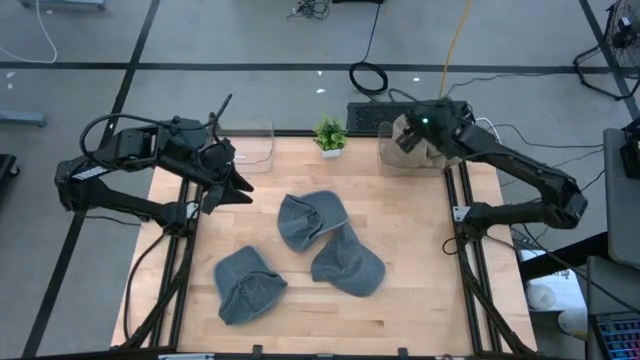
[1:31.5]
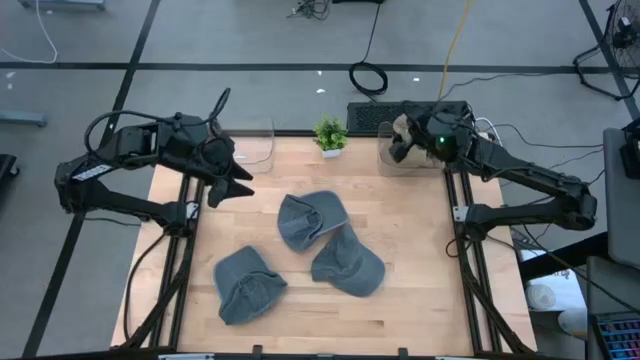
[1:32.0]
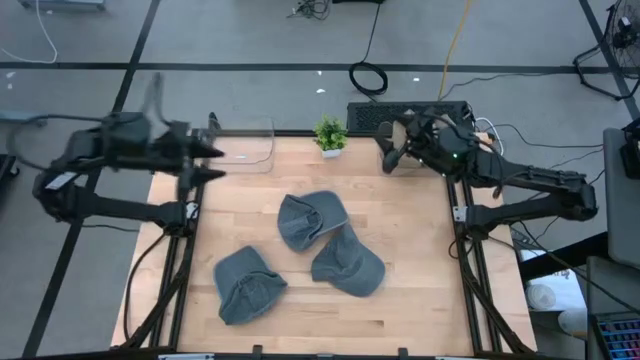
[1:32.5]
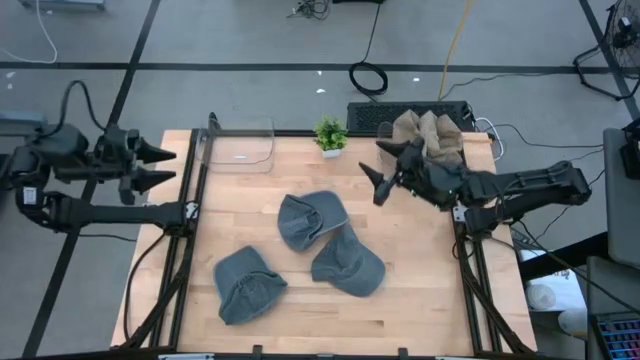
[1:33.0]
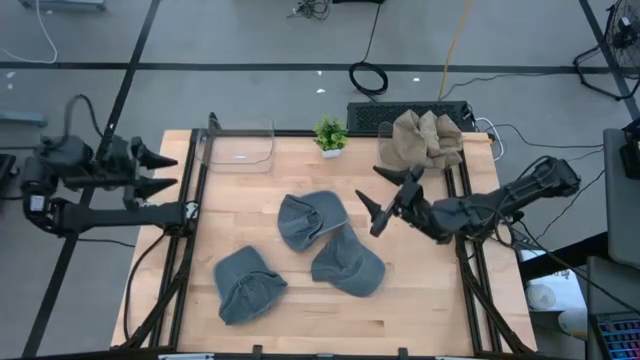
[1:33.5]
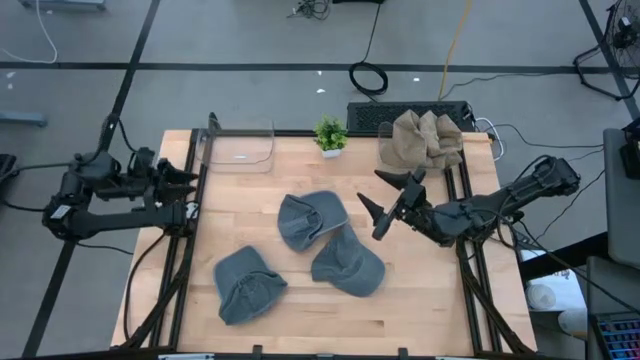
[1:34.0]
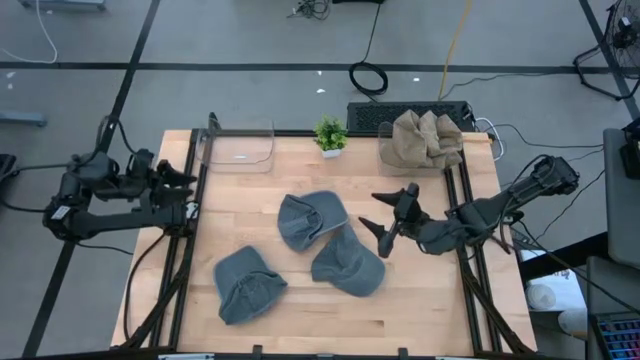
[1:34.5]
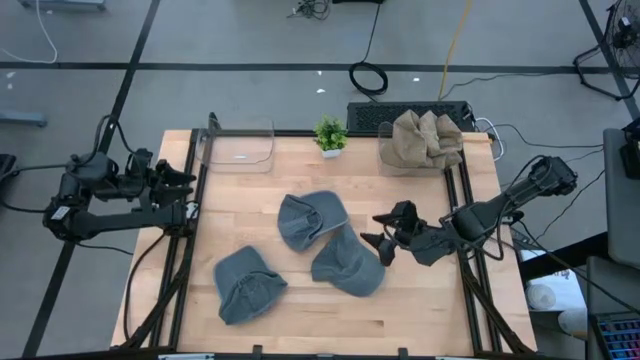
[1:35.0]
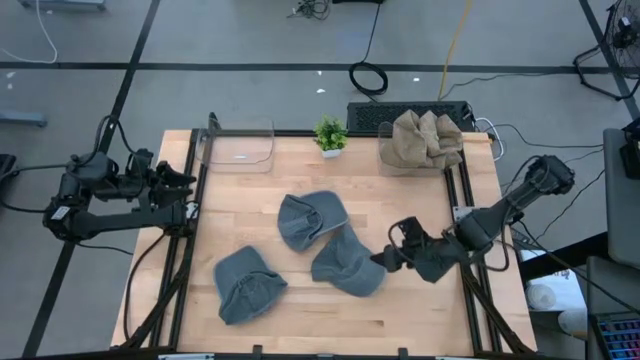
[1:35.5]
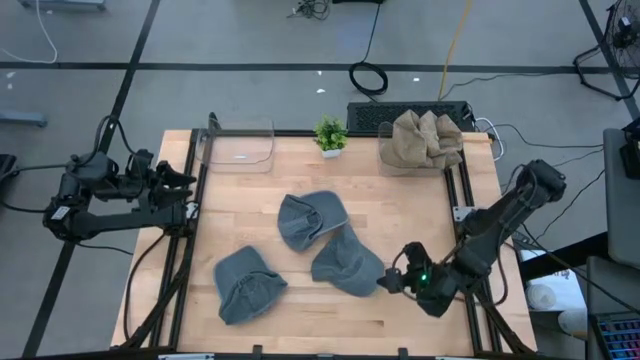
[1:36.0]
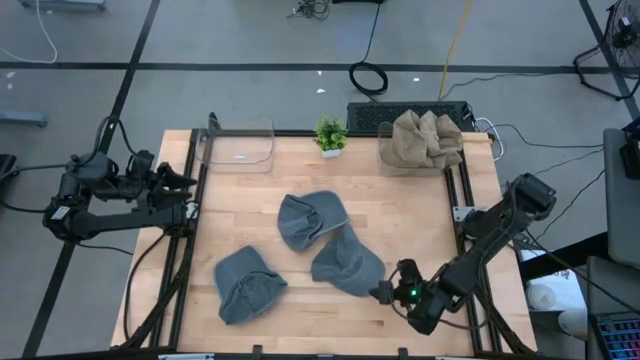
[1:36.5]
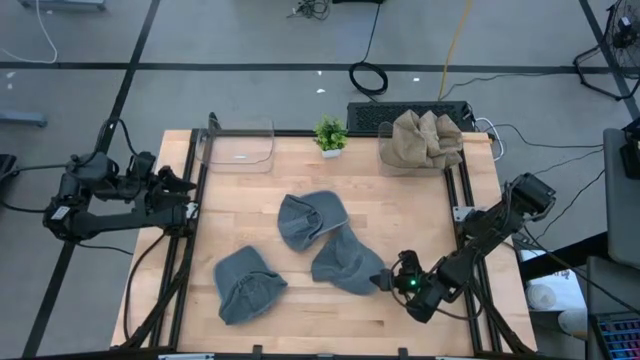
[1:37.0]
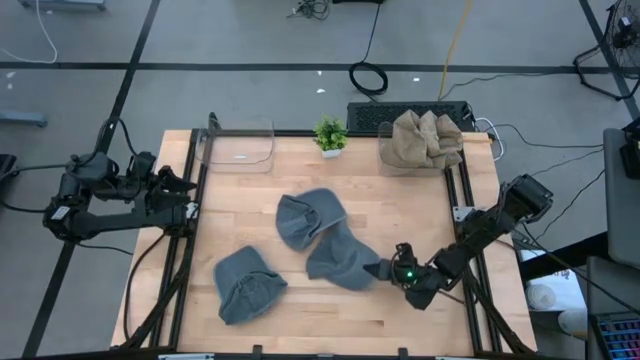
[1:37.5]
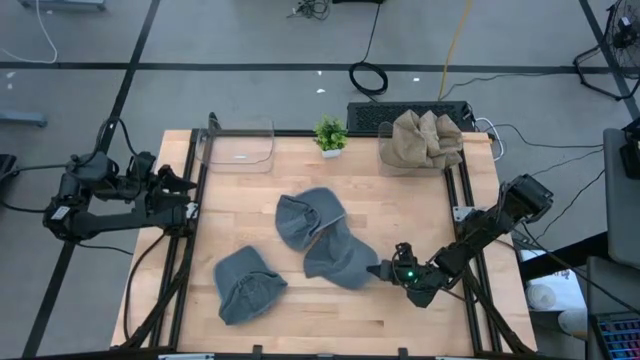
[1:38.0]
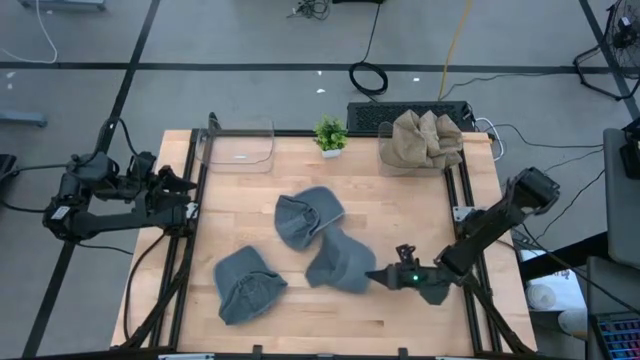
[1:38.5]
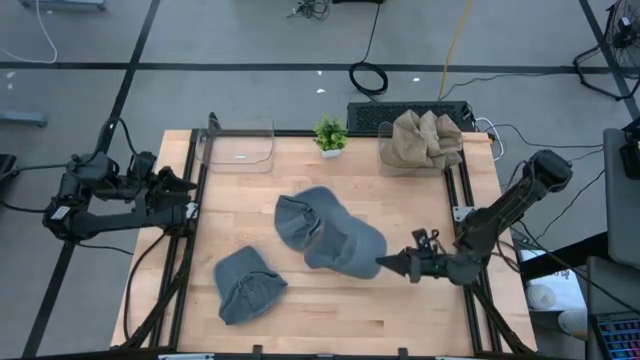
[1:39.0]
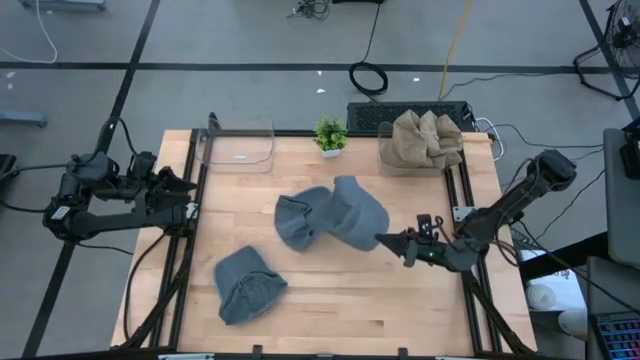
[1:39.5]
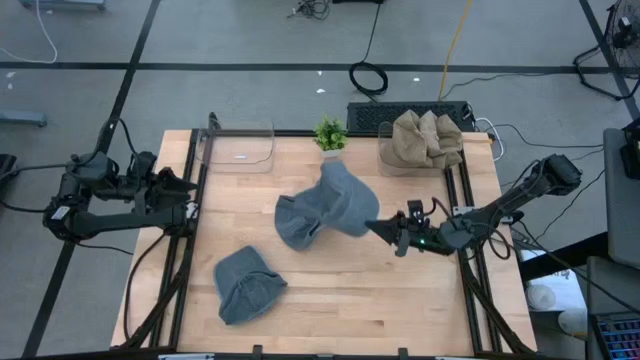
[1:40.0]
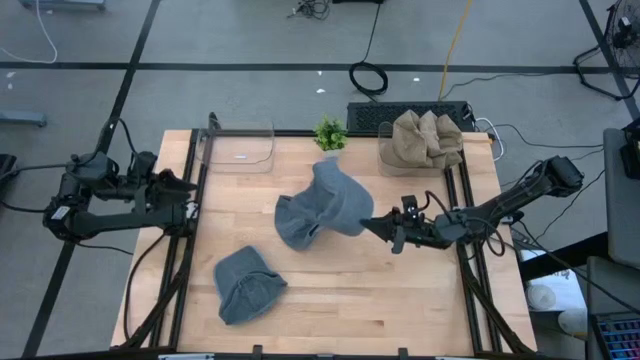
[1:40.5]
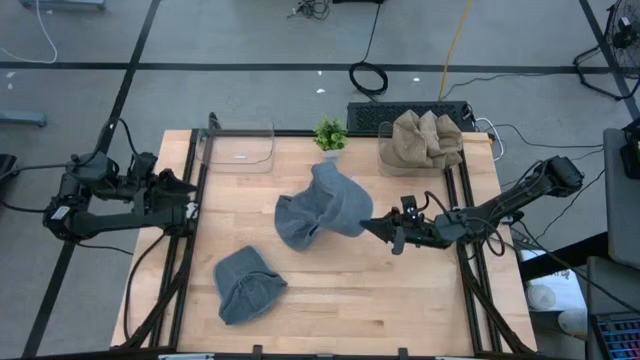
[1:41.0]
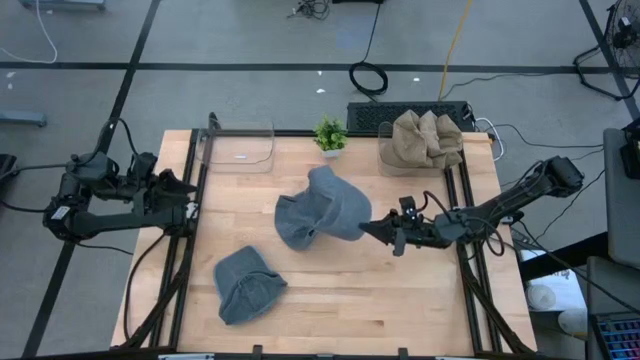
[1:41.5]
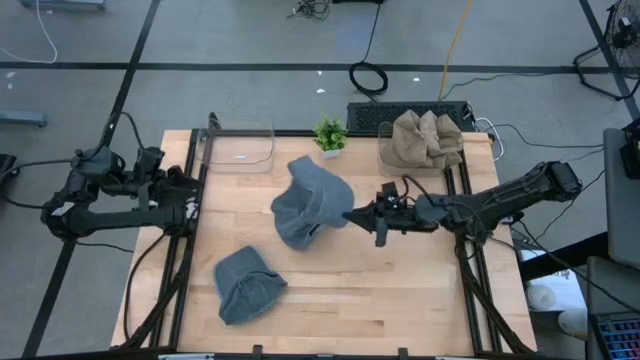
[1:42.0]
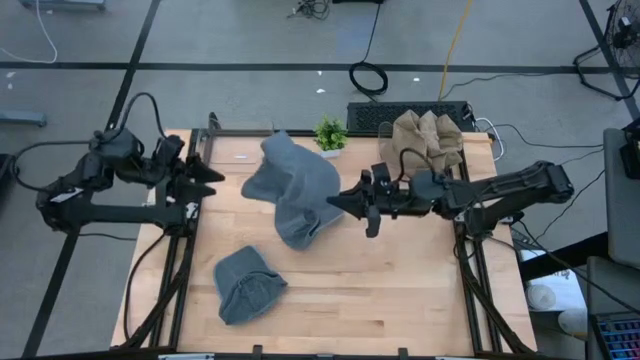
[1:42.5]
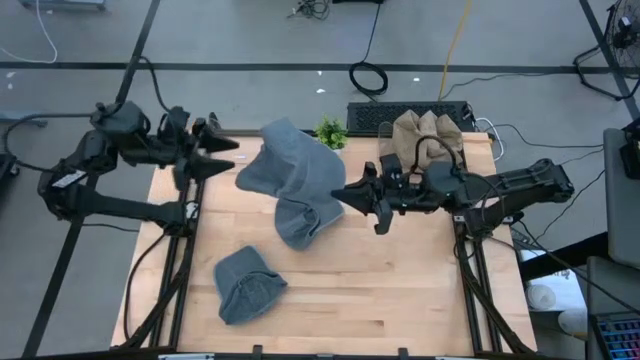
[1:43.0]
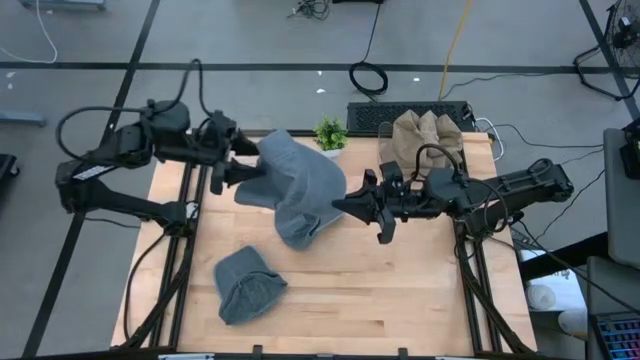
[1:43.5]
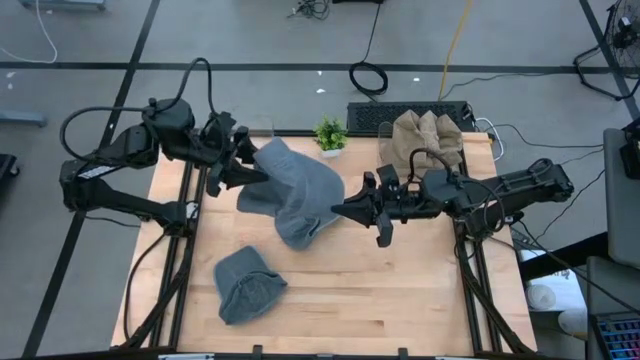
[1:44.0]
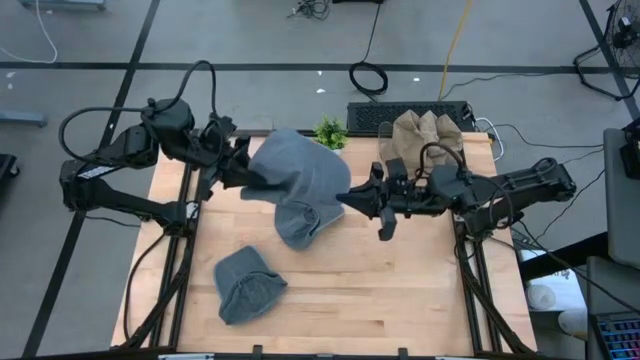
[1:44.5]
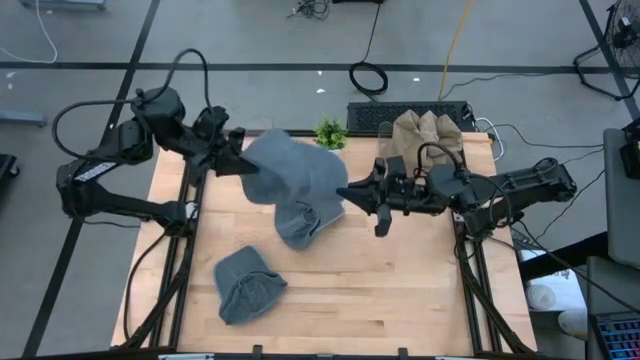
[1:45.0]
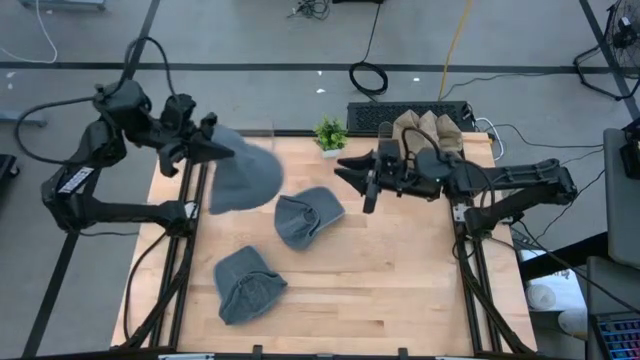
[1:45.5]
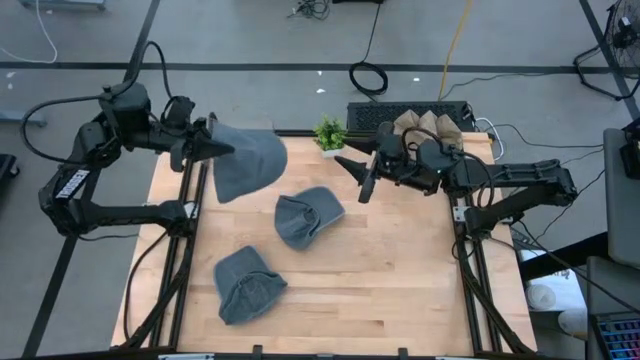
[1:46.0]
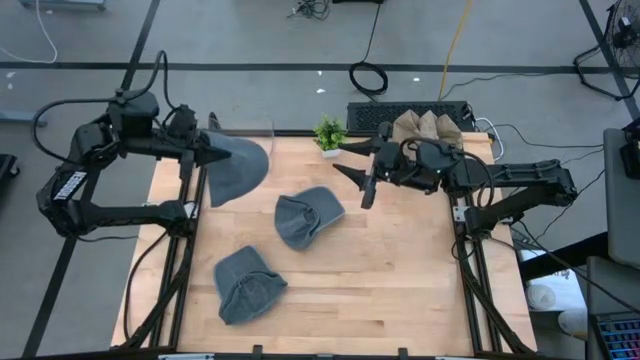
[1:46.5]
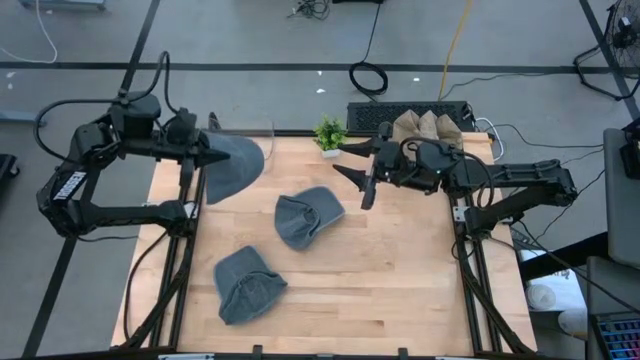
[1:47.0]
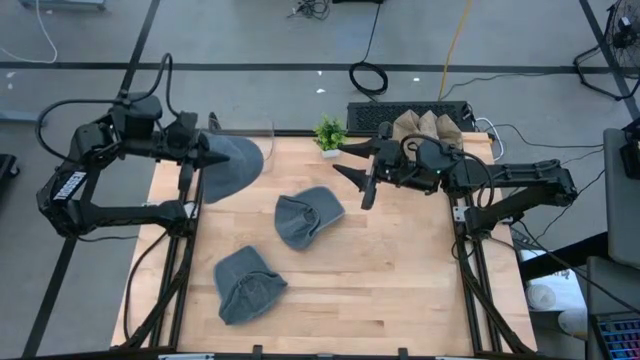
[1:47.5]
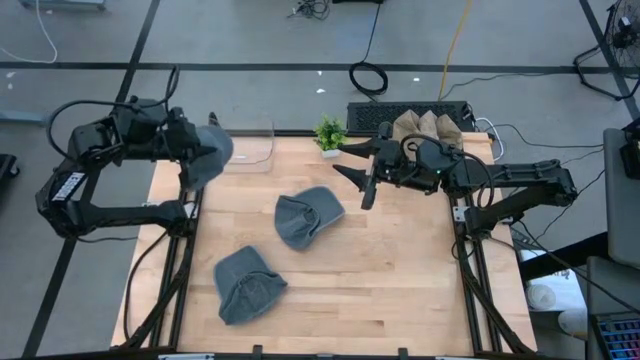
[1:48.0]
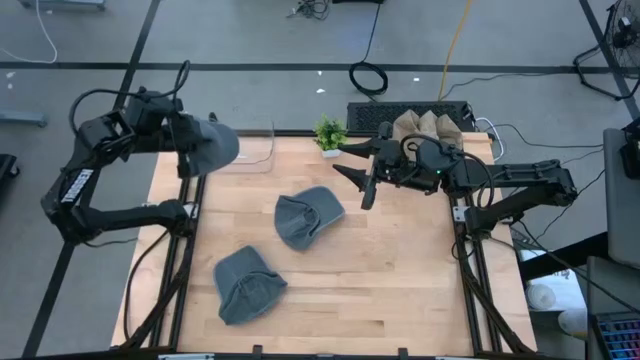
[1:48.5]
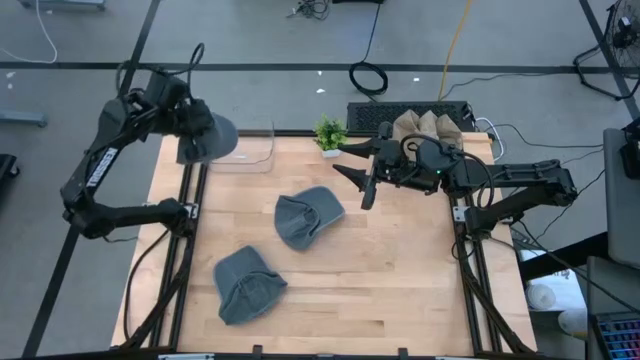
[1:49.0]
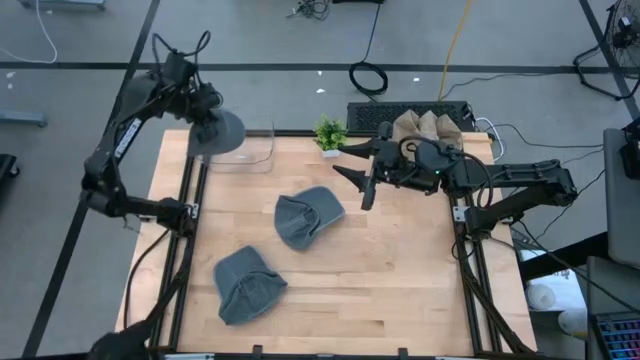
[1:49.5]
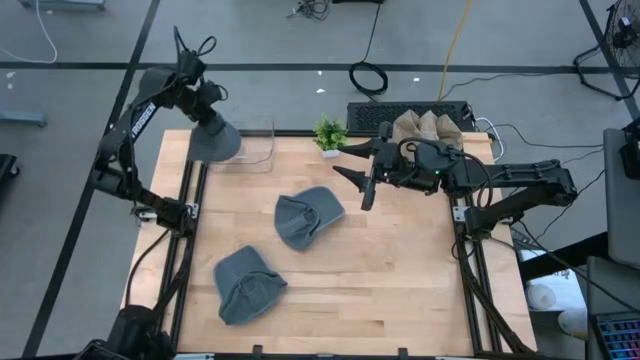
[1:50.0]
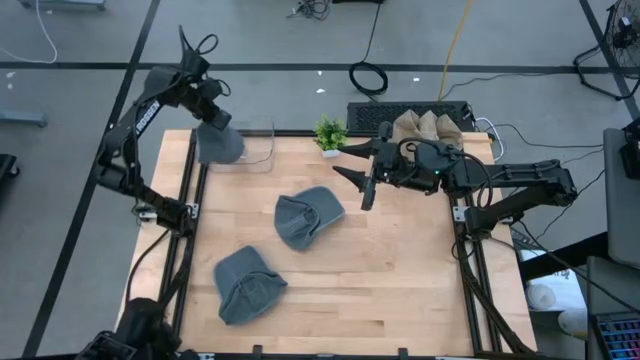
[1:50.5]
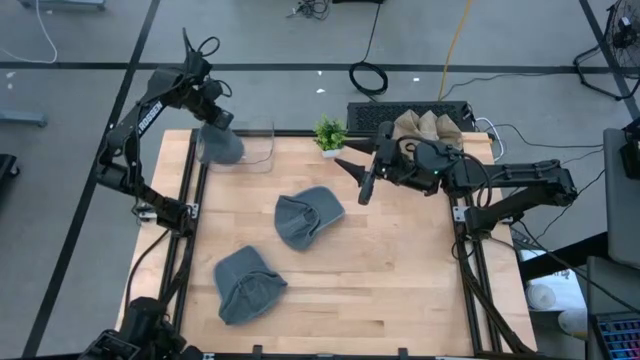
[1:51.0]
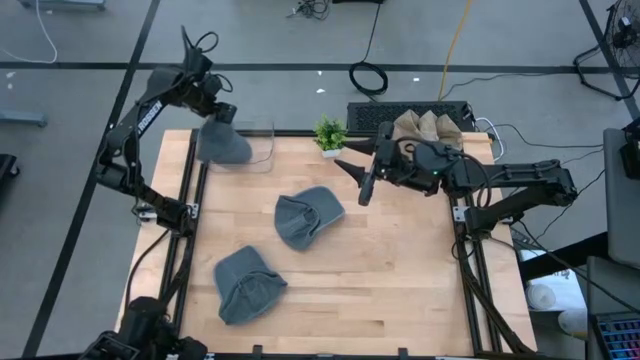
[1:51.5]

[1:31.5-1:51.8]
Task: Pick & Place hat
Put the bottom right blue cap into the left transparent bin
